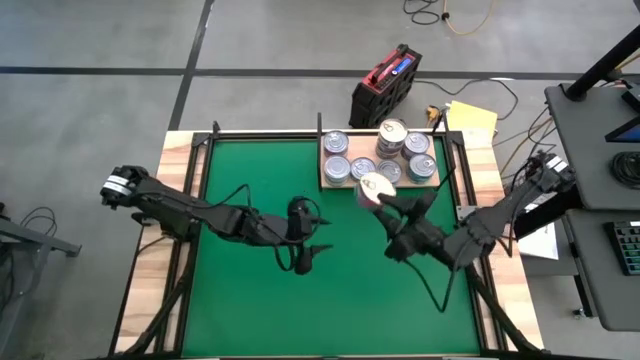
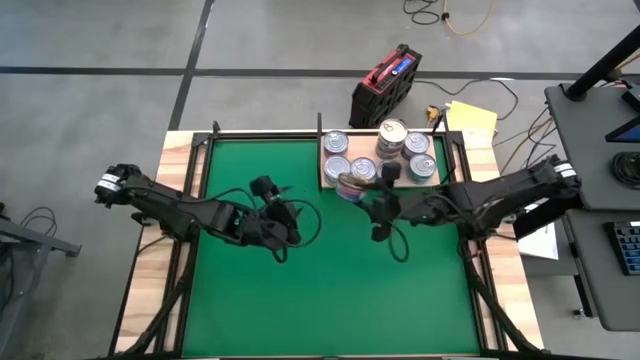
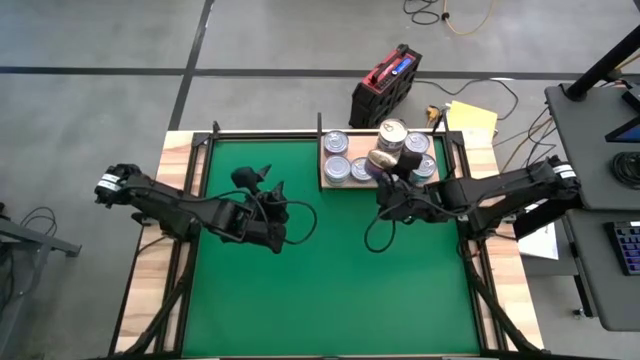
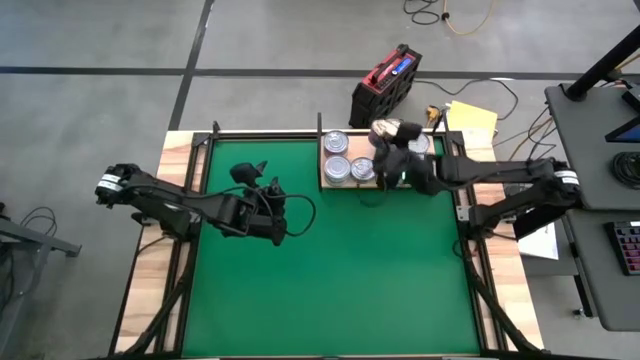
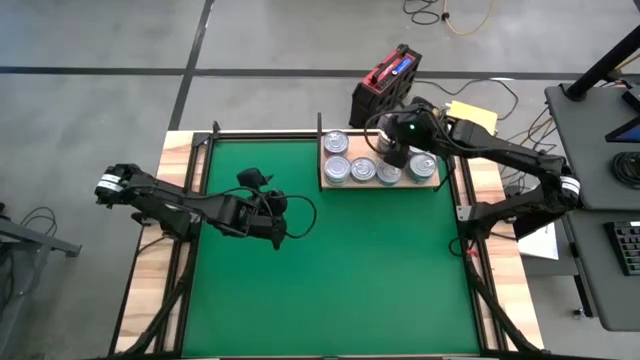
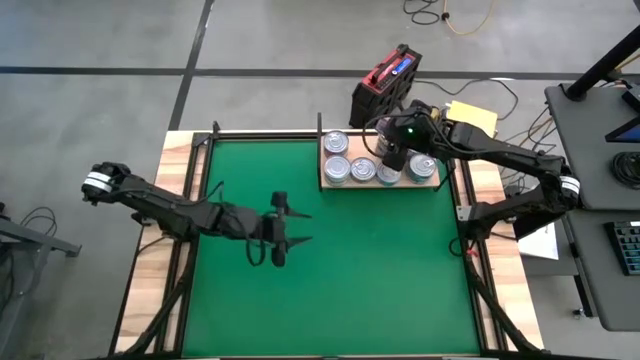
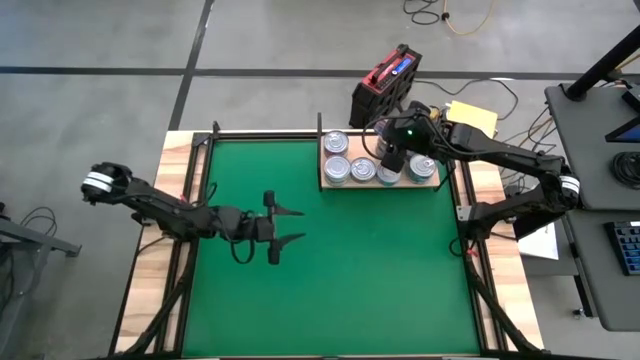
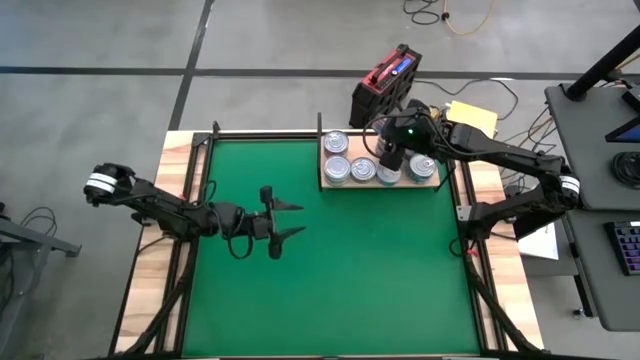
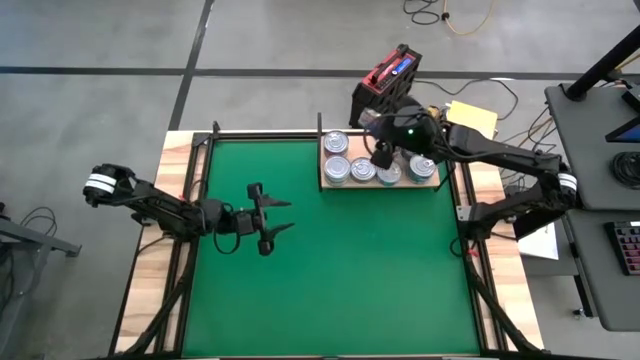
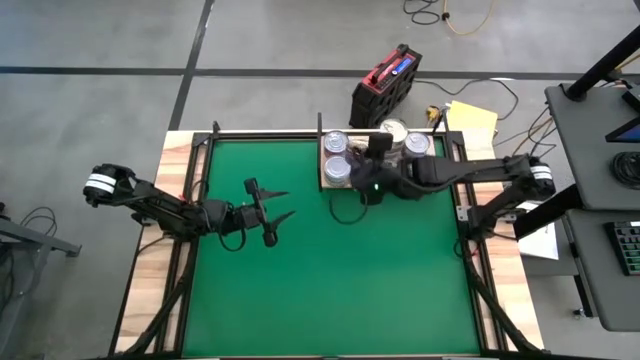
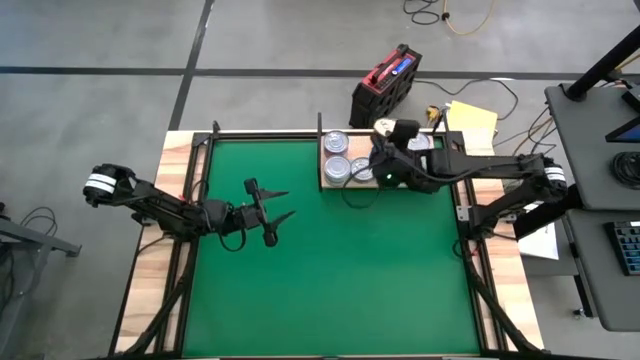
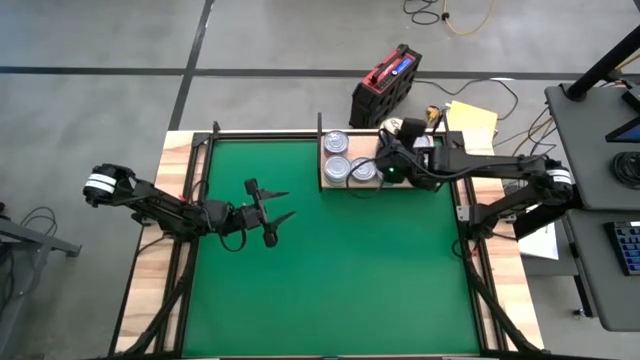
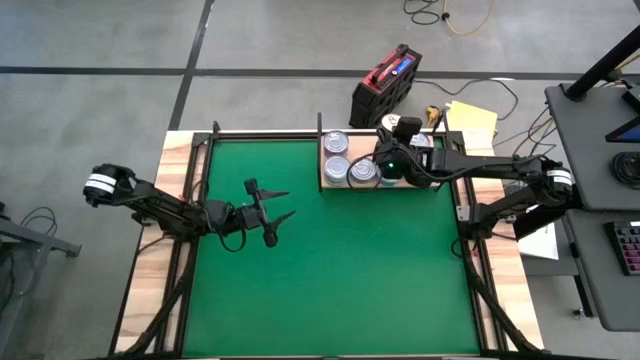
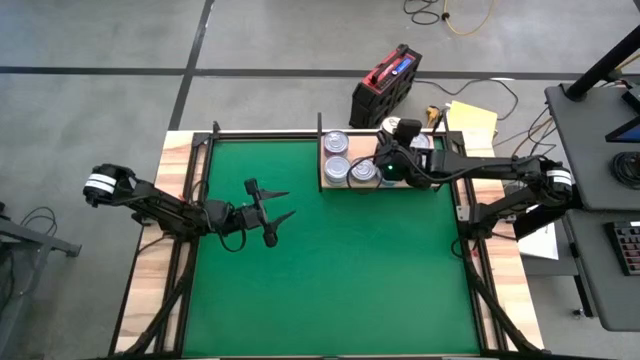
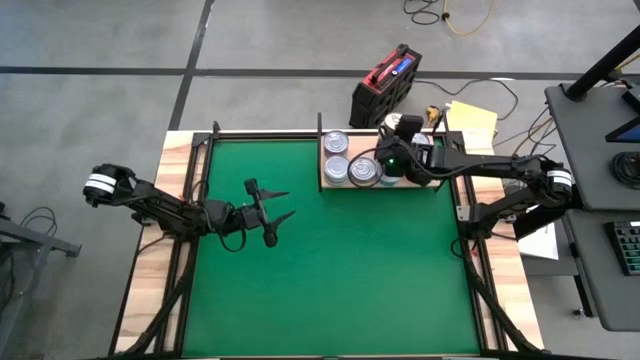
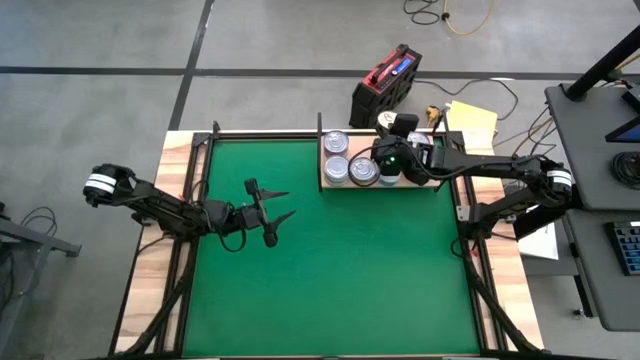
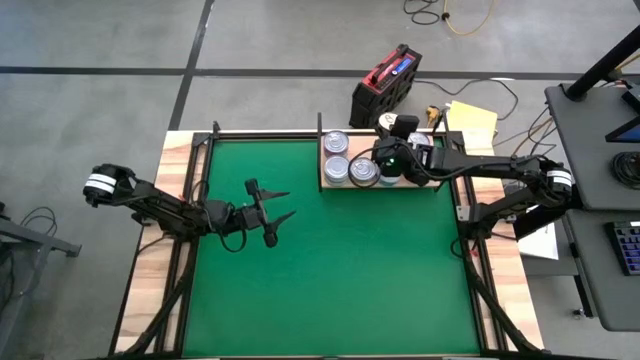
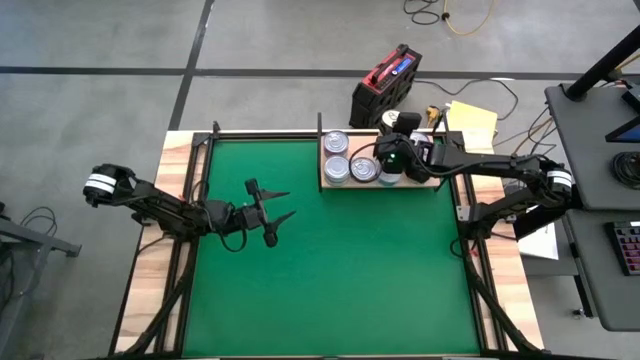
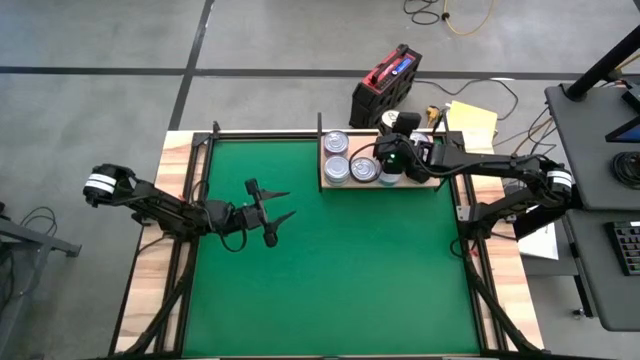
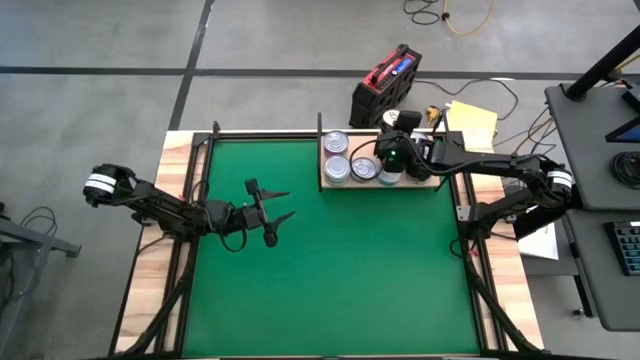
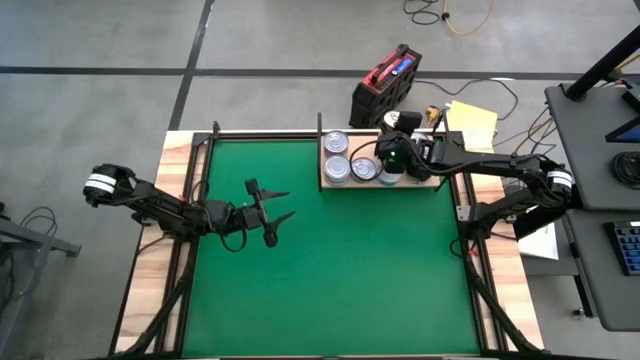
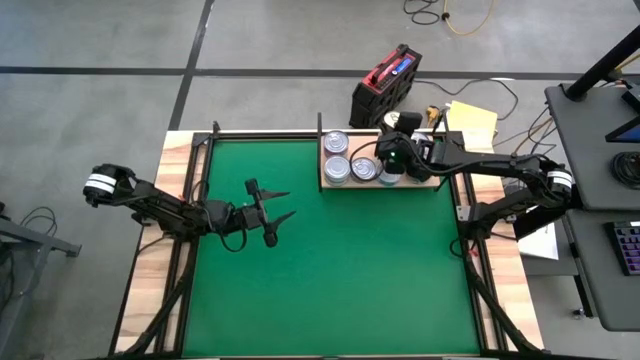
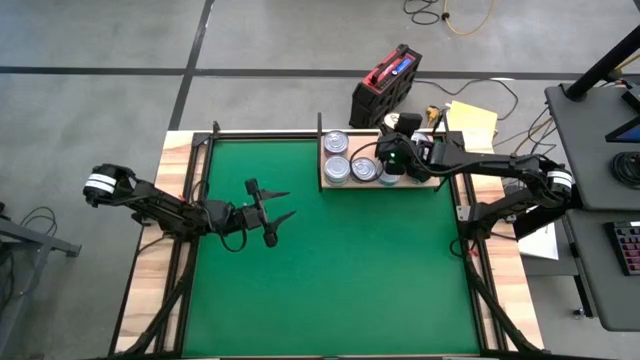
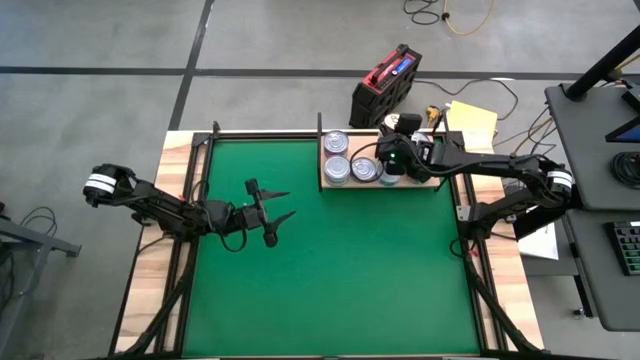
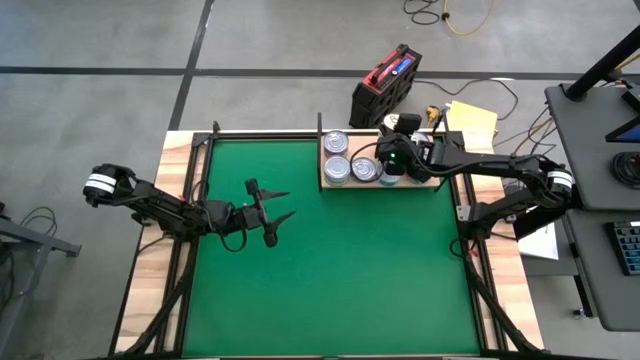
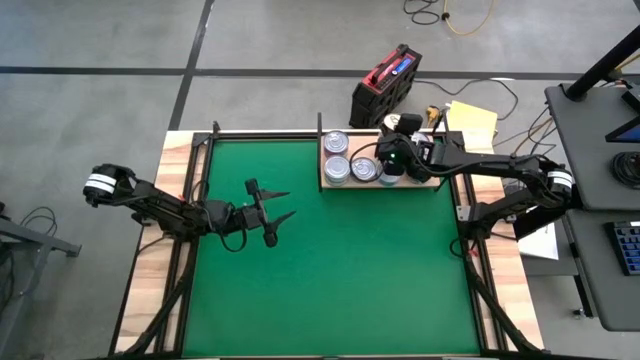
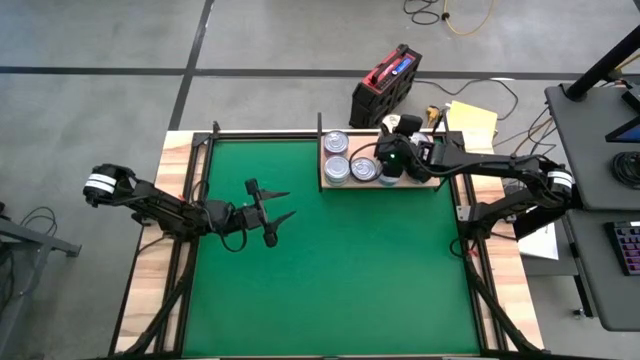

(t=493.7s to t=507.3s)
Task: Stack canned seafood by type on shelf
Stack the blue/pink tuna can on top of the blue/pink tuna can on the shelf

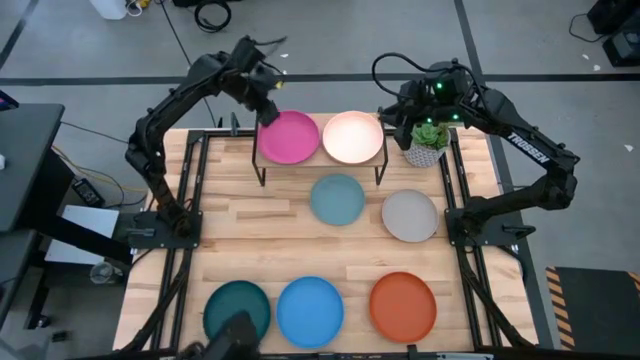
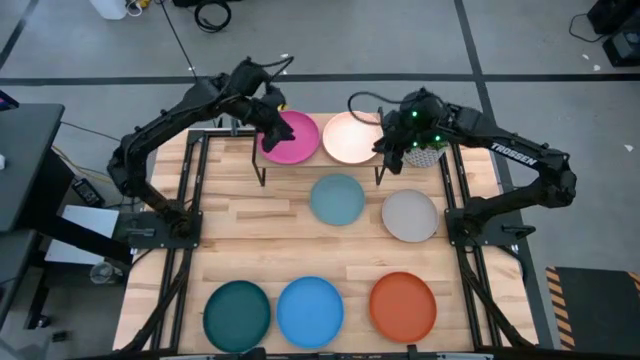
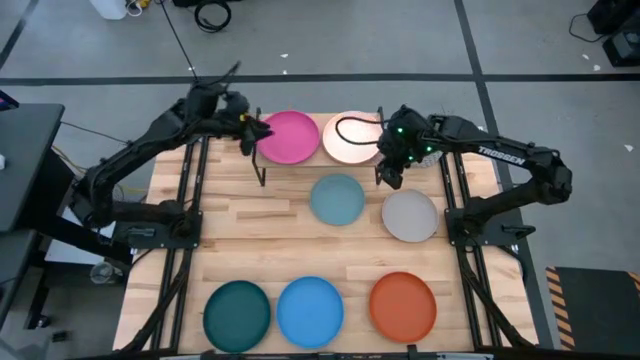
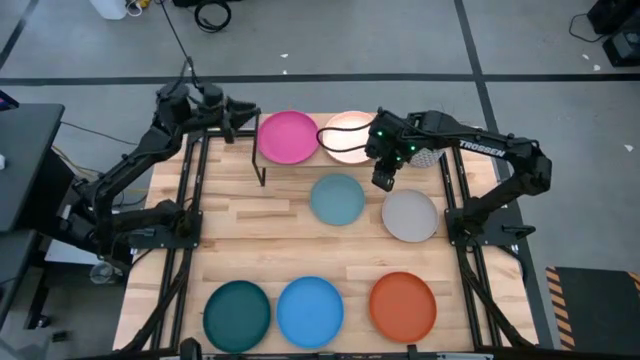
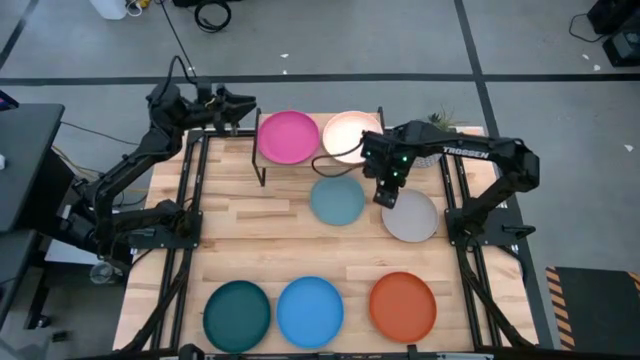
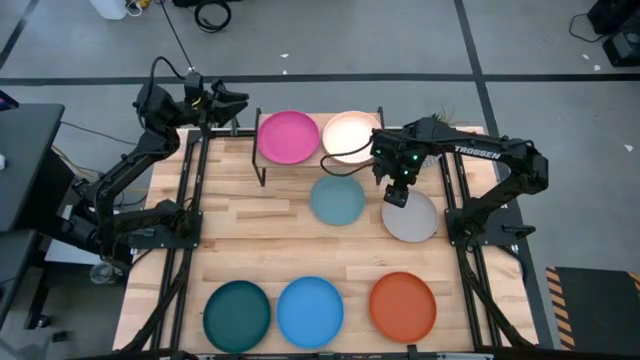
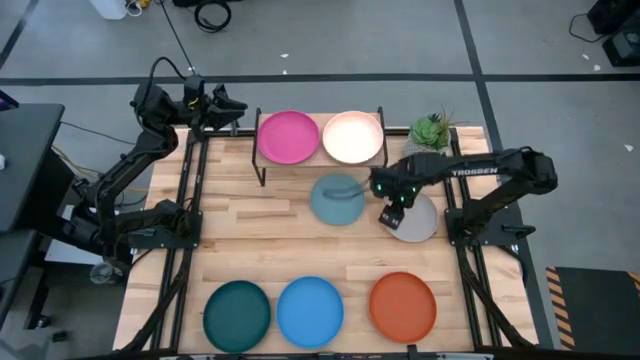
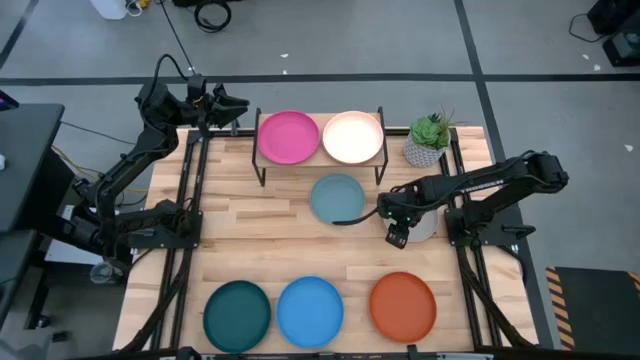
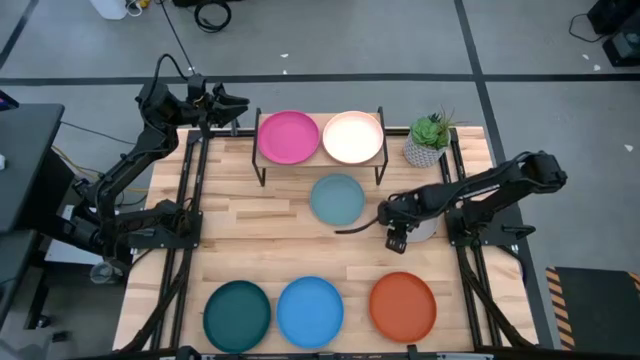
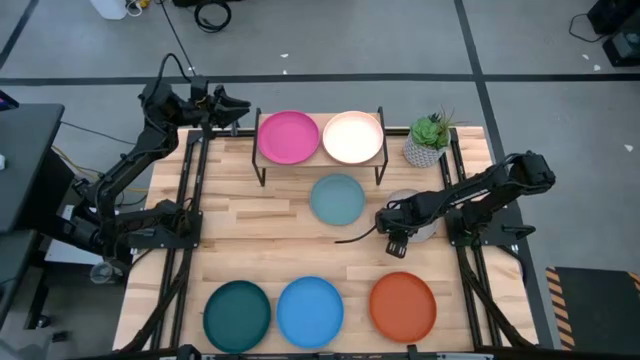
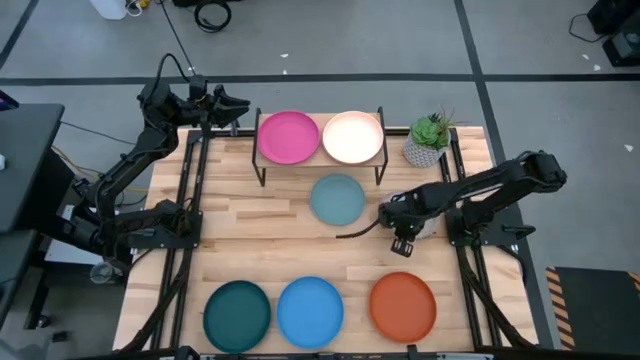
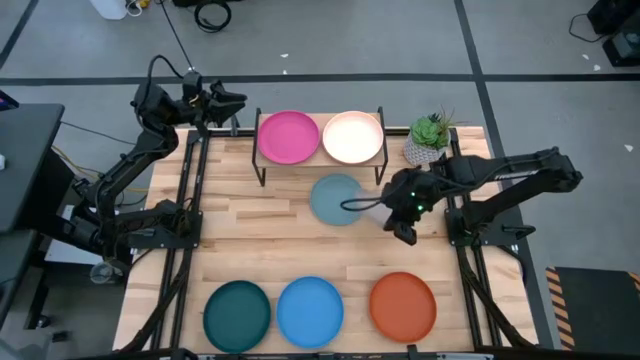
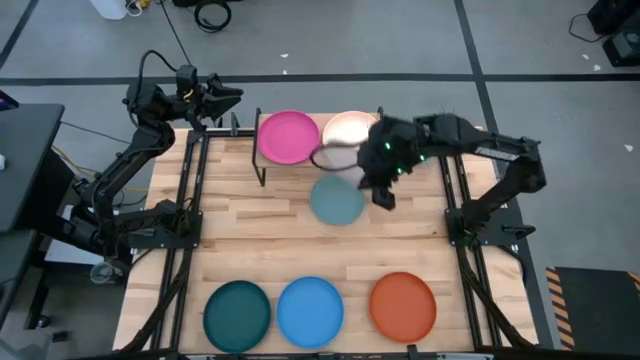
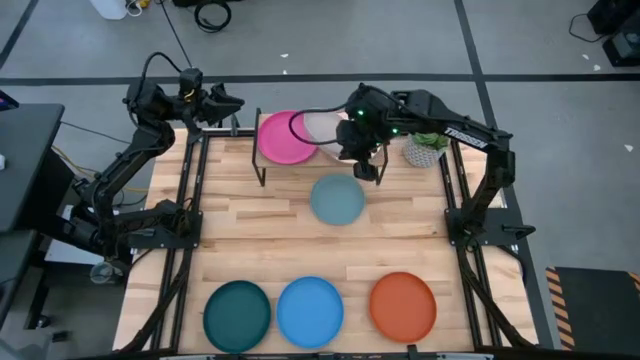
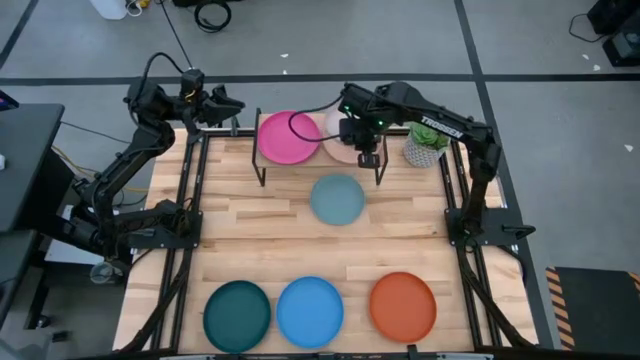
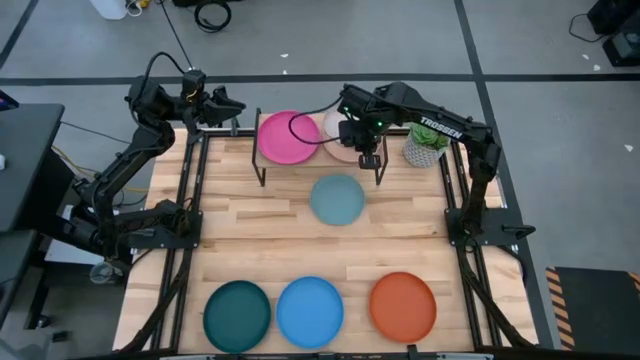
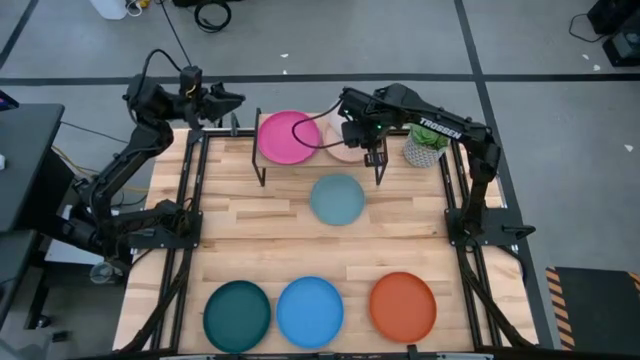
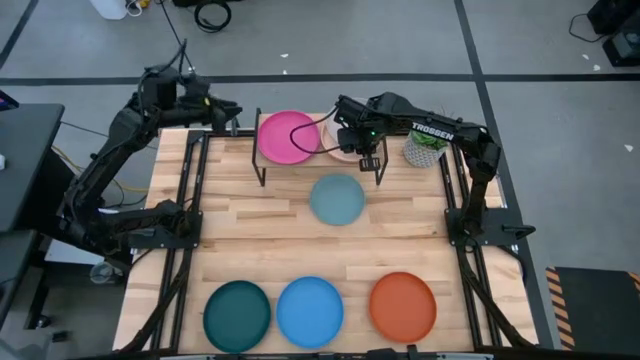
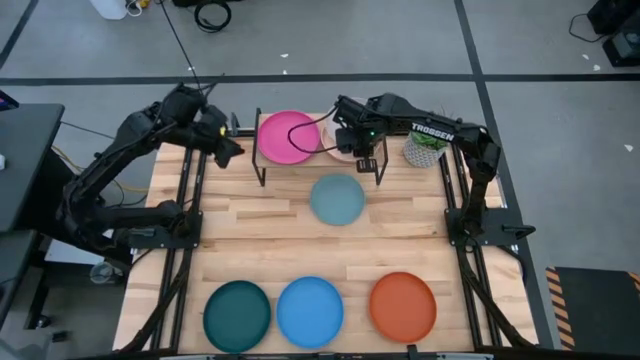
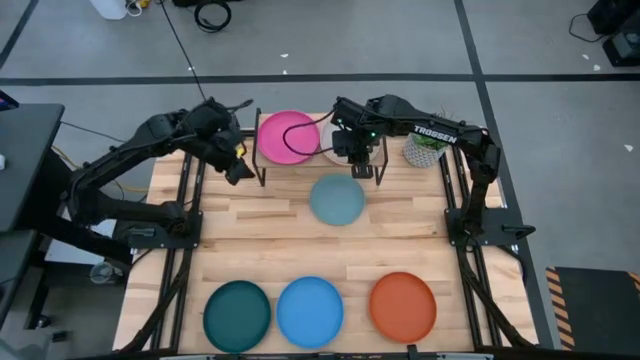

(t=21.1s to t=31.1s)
Task: Place and stack plates onto a shelf
Stack the gray plate on top of the white plate on the shelf
